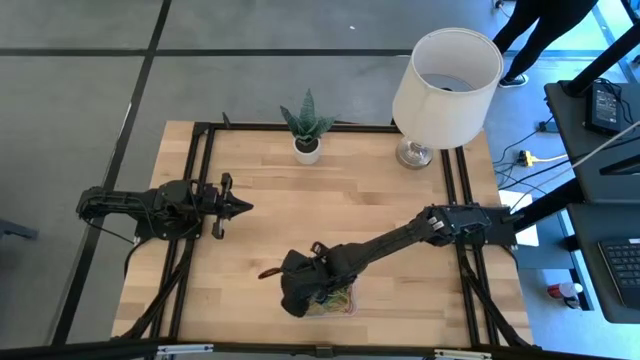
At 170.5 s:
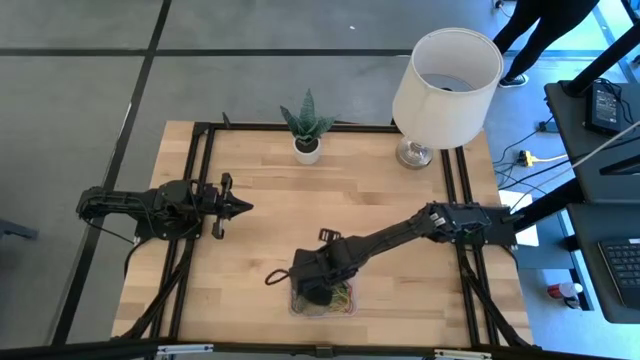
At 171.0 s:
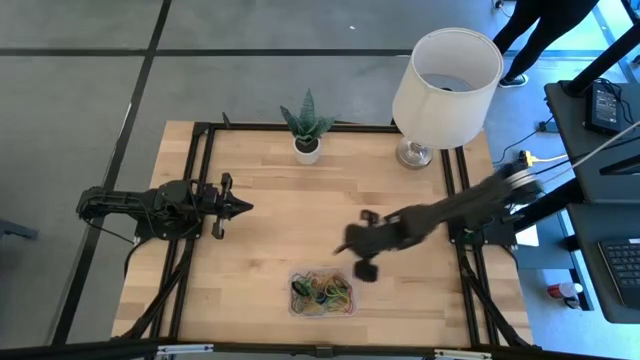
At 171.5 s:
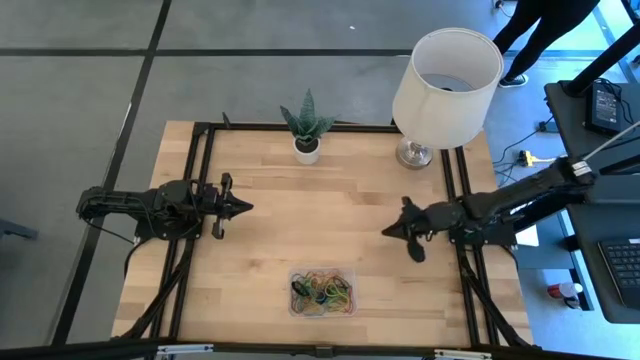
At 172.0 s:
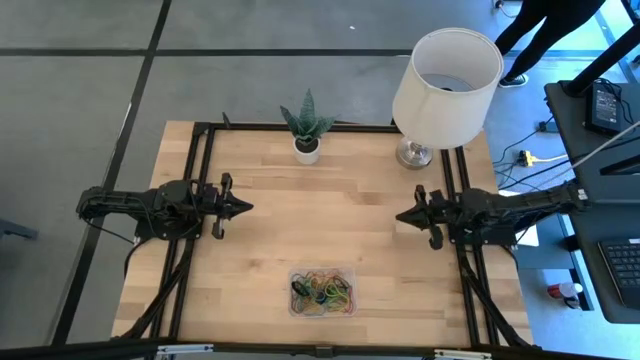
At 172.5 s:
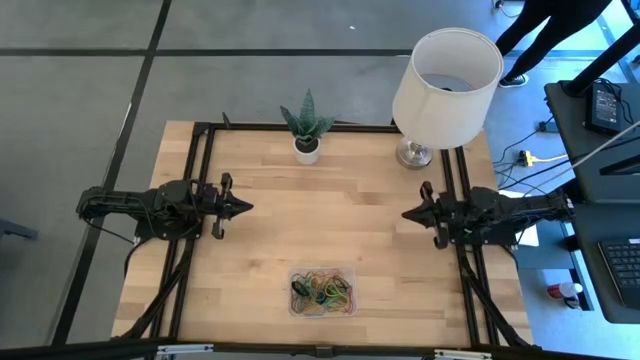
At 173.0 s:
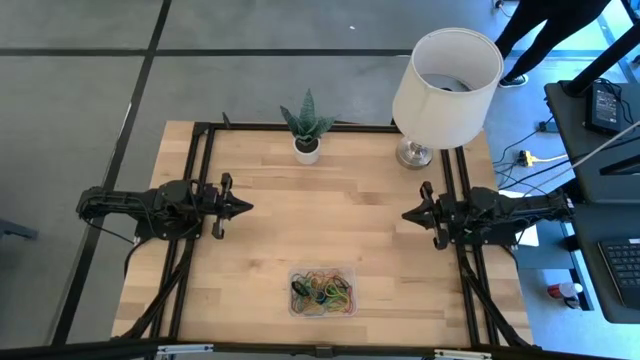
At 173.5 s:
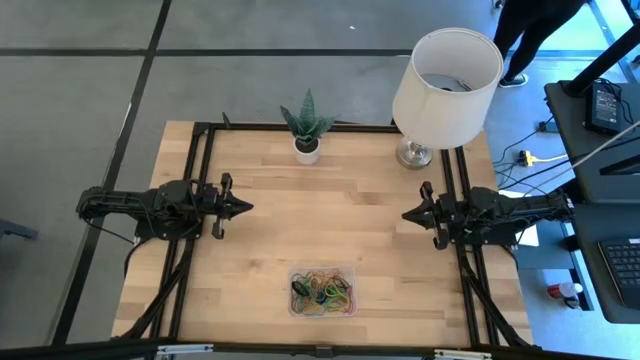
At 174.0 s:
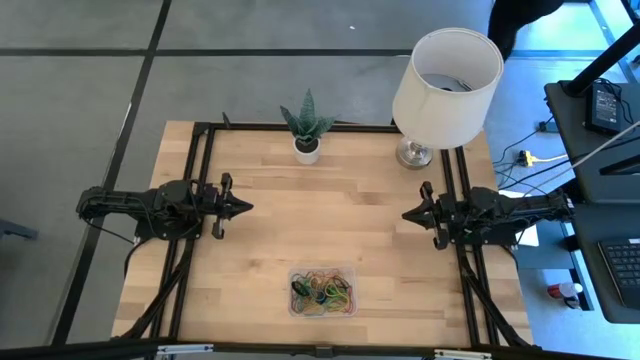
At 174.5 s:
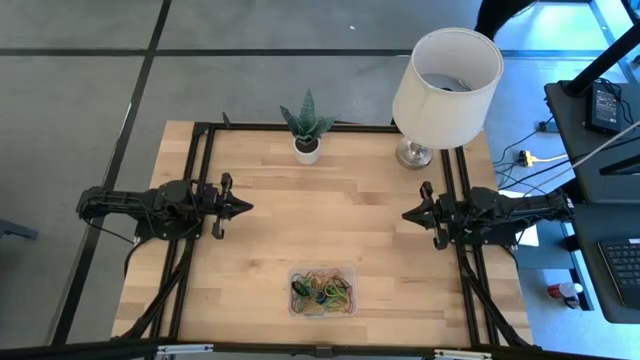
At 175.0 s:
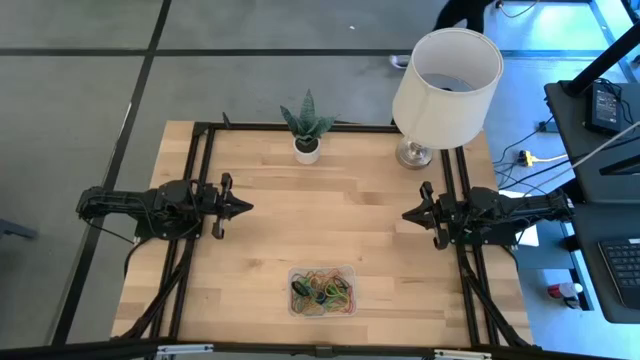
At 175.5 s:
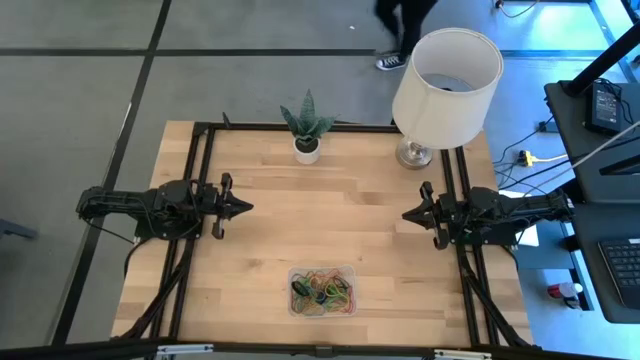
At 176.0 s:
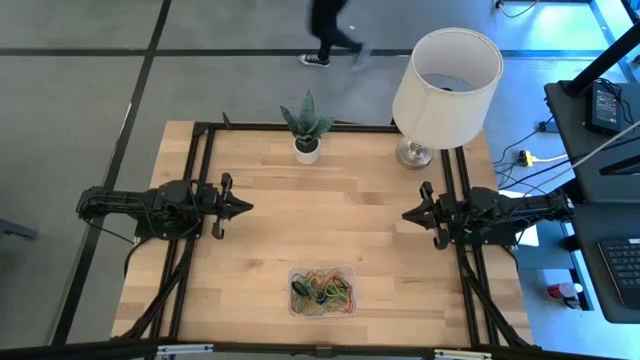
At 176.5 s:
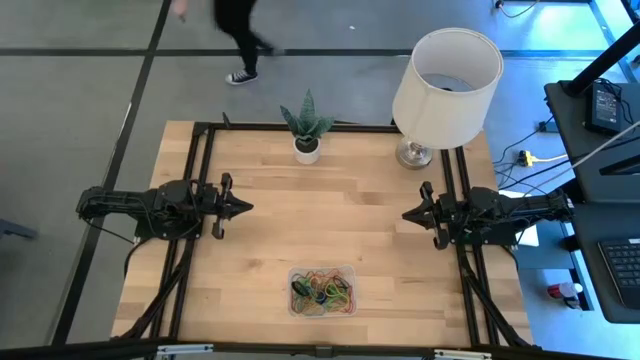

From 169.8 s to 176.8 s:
Task: Pick and place rubber bands into bin
Return to Home Position

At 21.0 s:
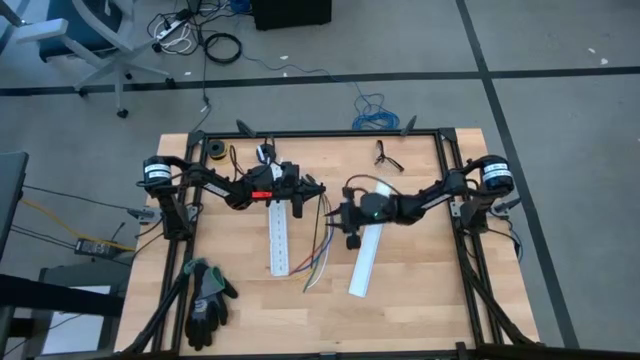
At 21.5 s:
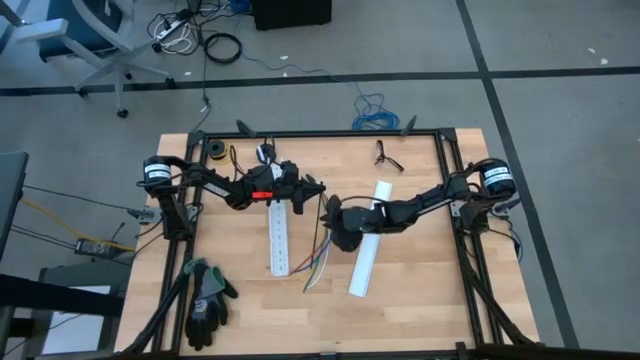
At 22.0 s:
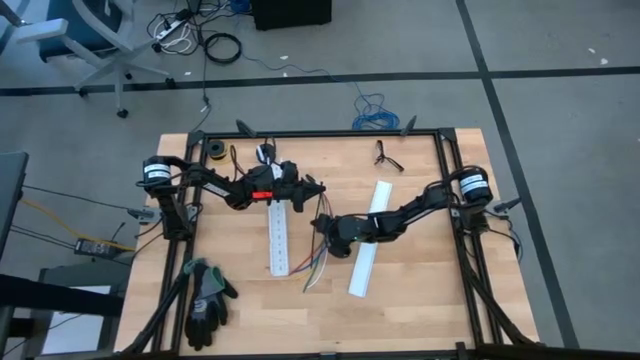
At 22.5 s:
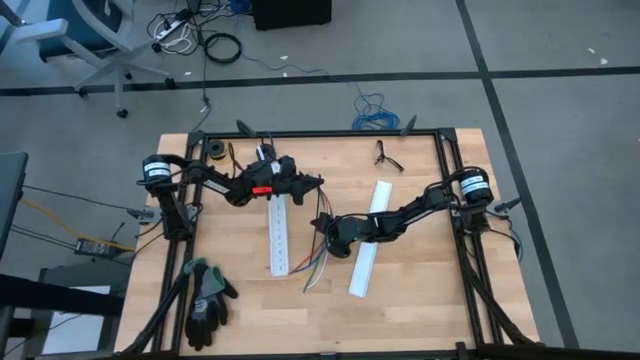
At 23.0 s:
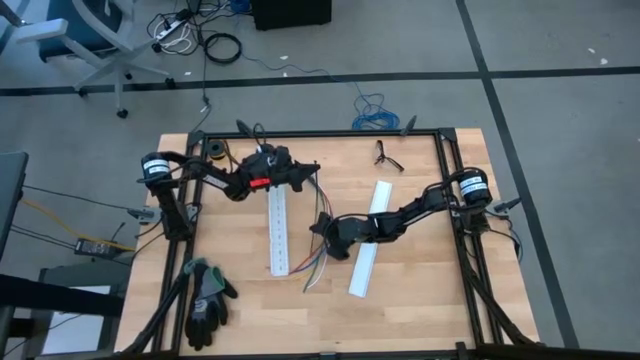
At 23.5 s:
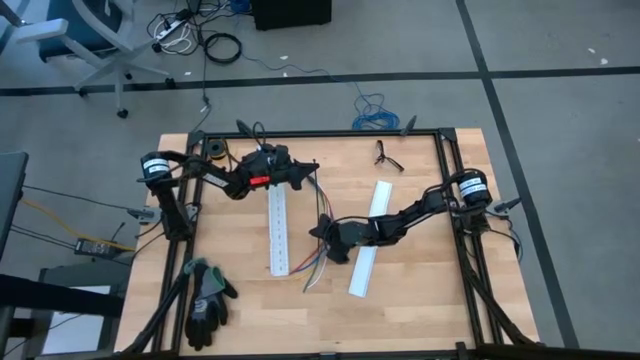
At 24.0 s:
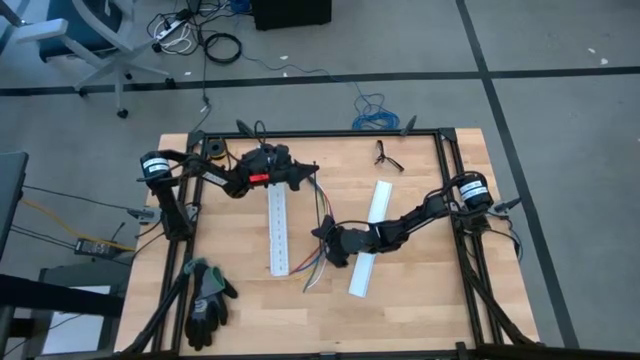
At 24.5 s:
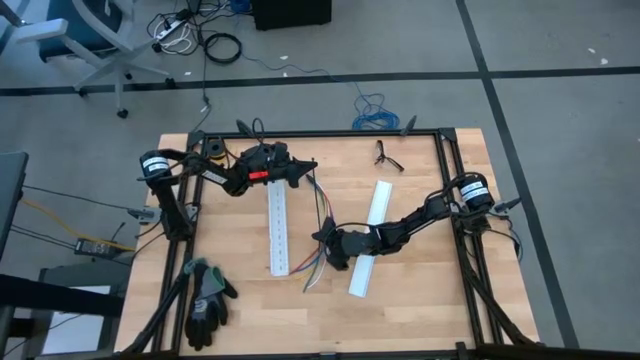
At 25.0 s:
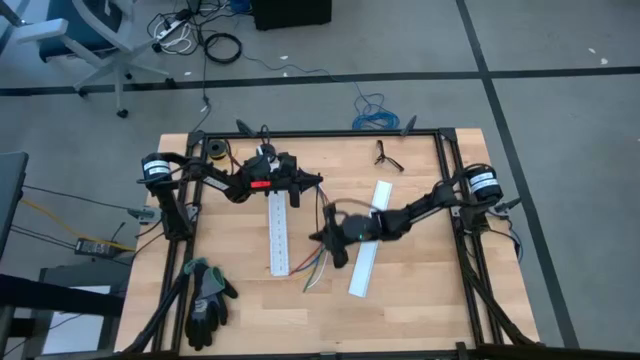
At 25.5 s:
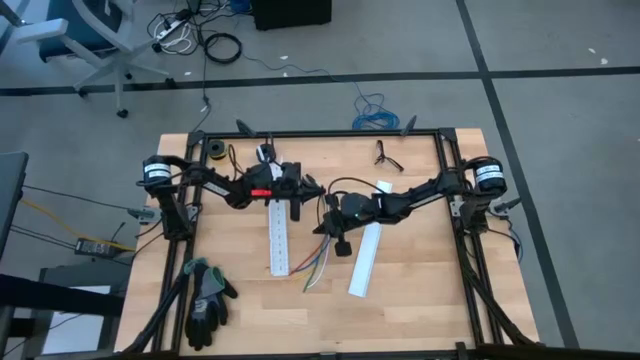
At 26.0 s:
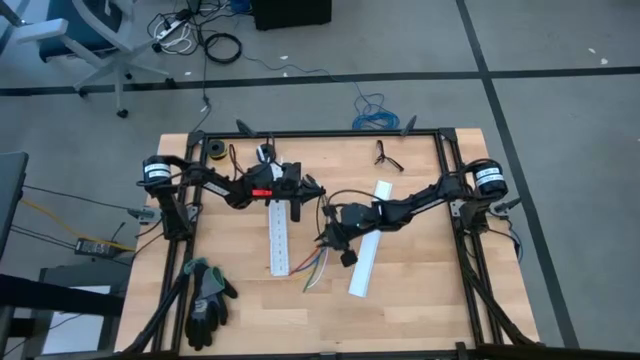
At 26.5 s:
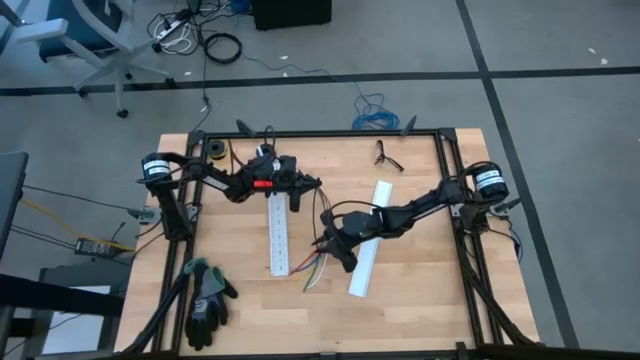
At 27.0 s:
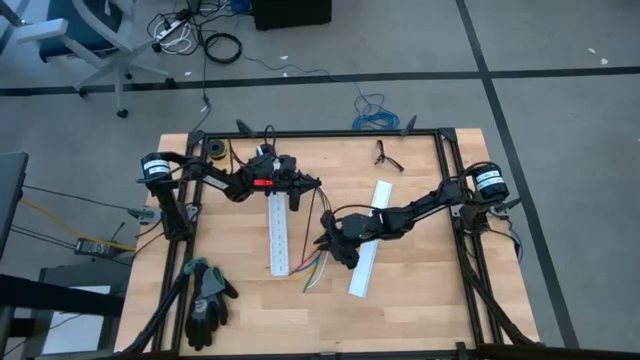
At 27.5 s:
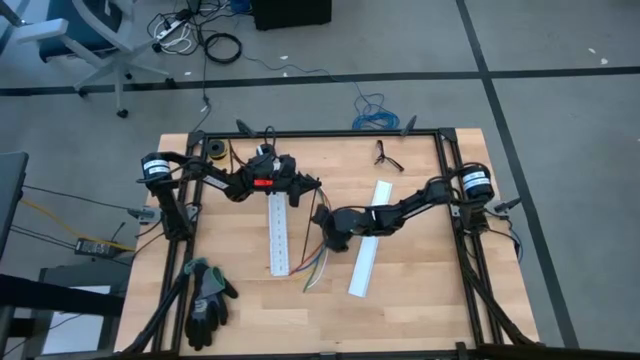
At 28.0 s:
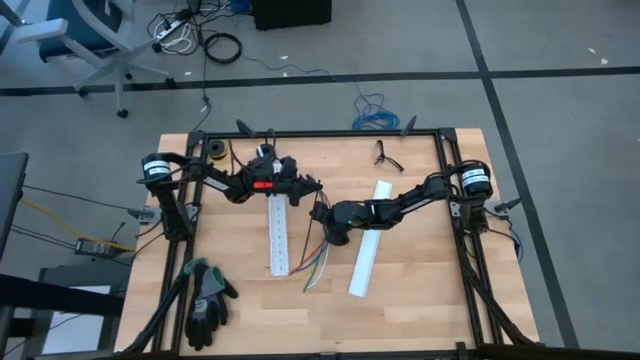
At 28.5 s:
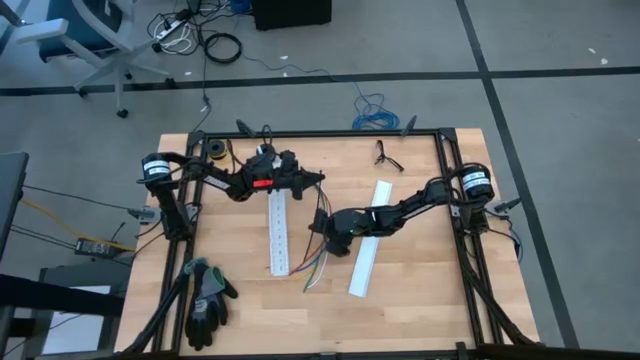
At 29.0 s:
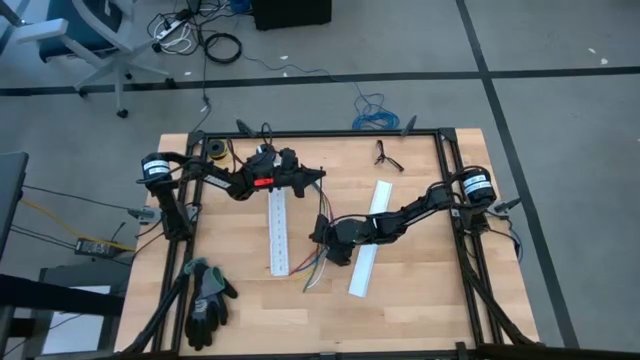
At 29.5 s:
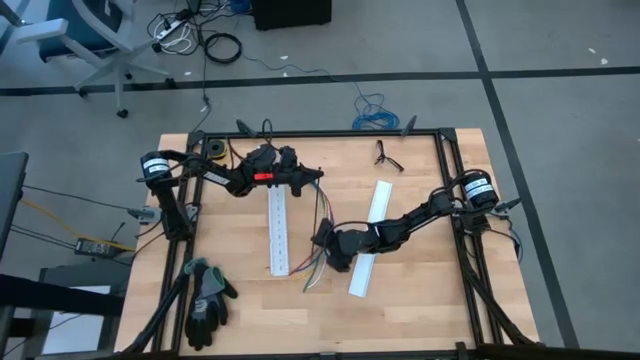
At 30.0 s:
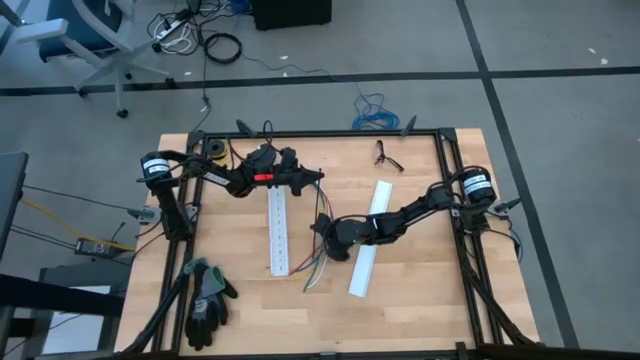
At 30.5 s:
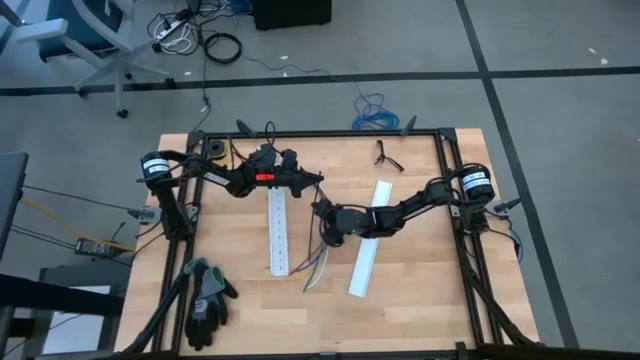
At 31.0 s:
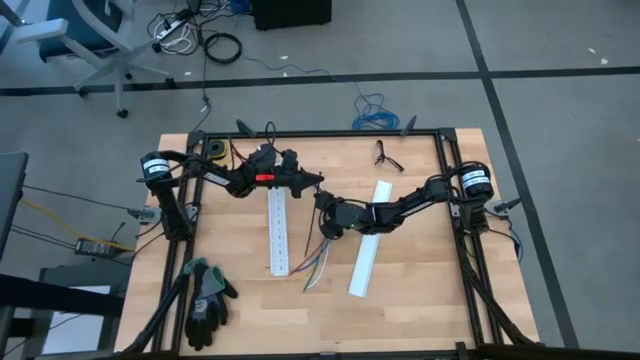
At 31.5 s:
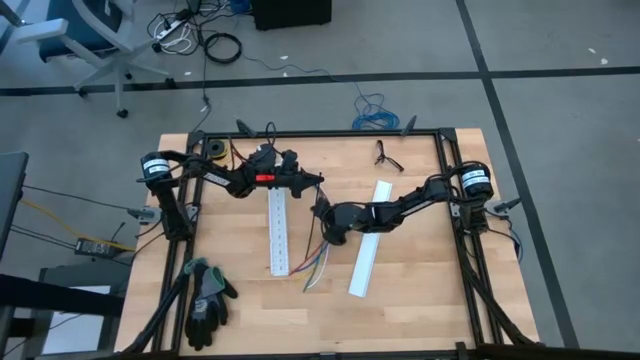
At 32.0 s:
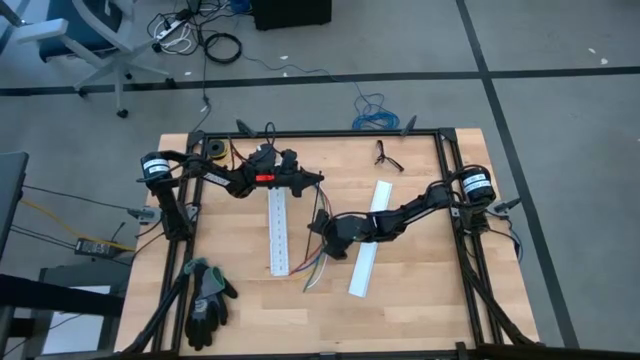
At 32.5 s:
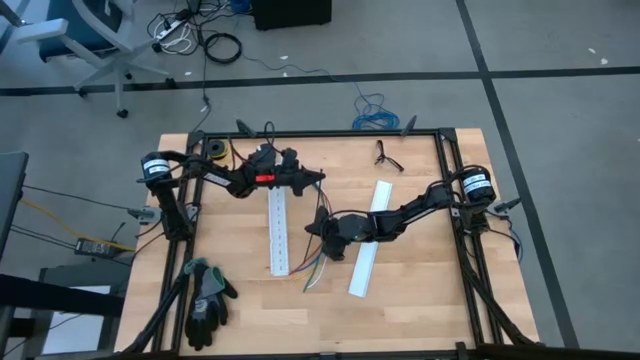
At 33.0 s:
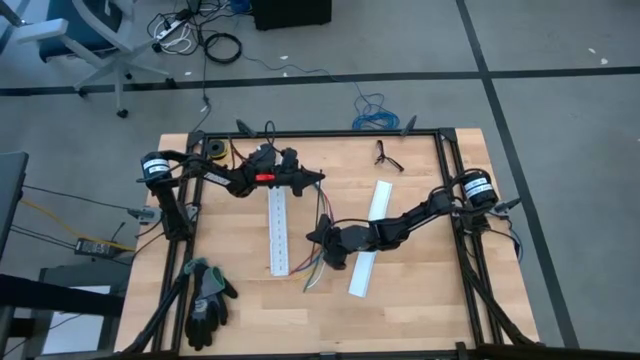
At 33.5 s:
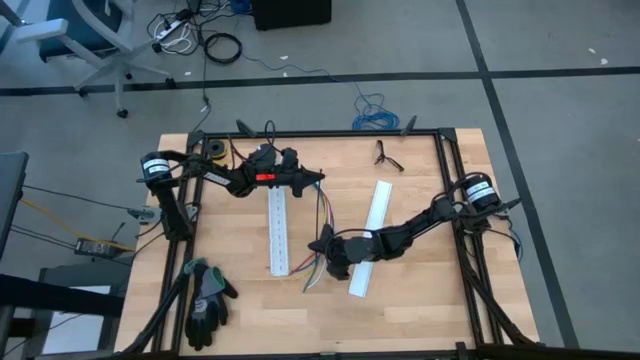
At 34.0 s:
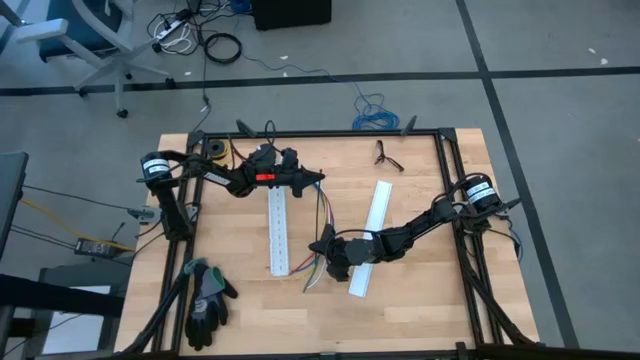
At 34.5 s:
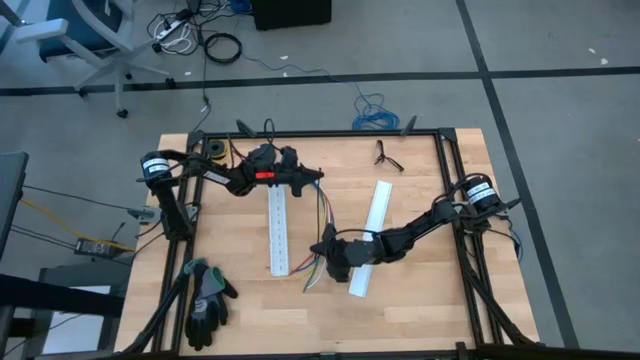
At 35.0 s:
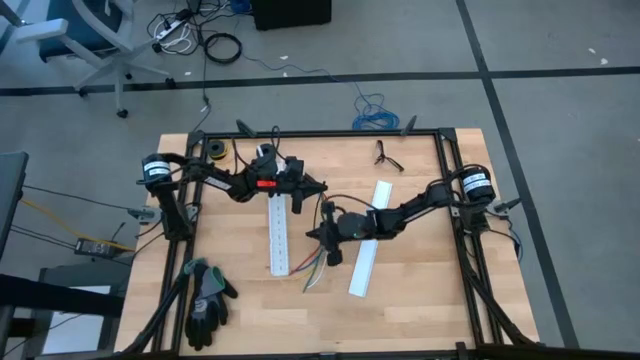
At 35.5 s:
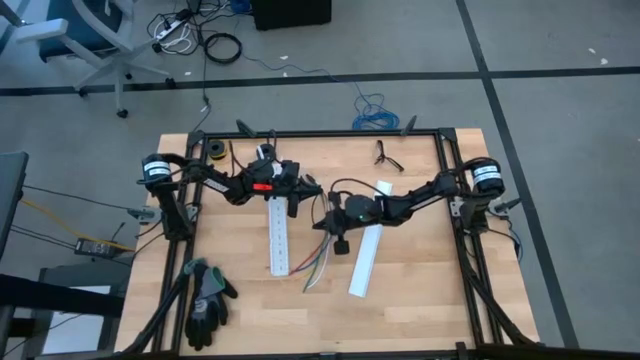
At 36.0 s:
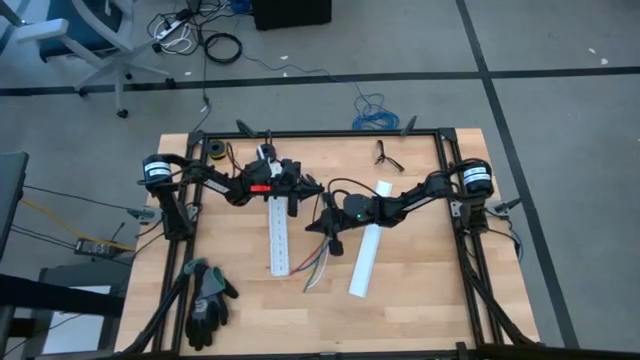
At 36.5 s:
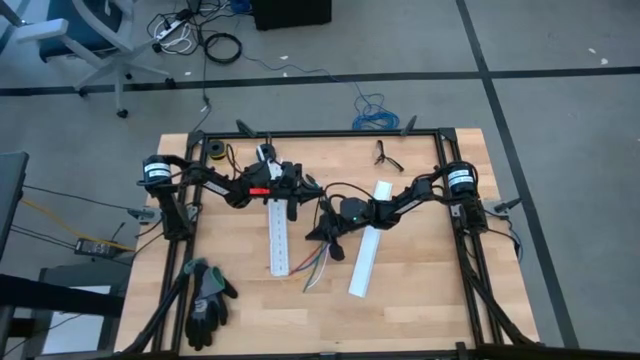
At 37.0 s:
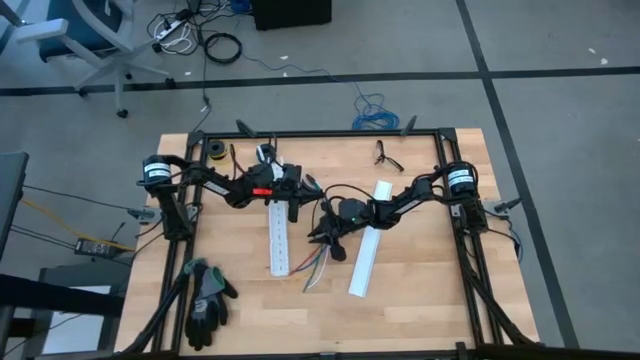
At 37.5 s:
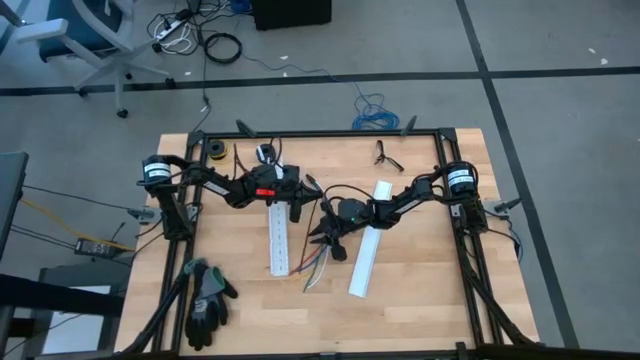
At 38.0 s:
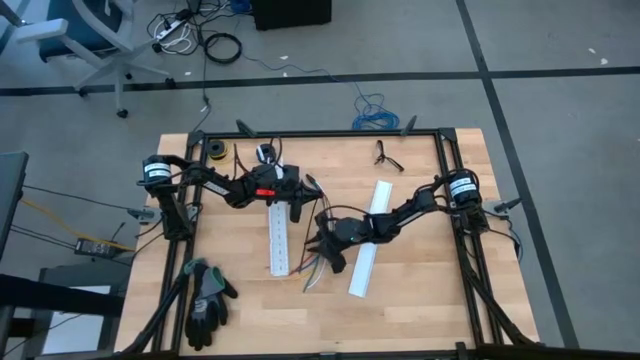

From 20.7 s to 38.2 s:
Task: Ziptie cables
Wrap the zip tie into the cable wires
